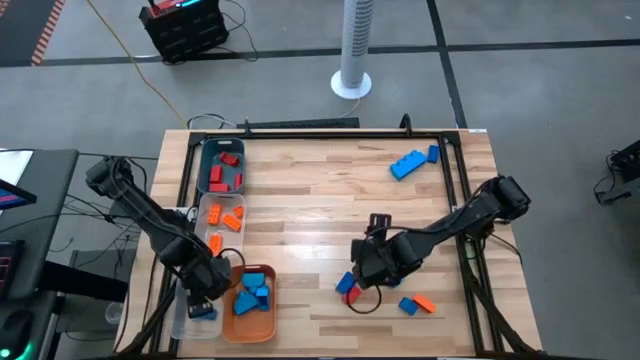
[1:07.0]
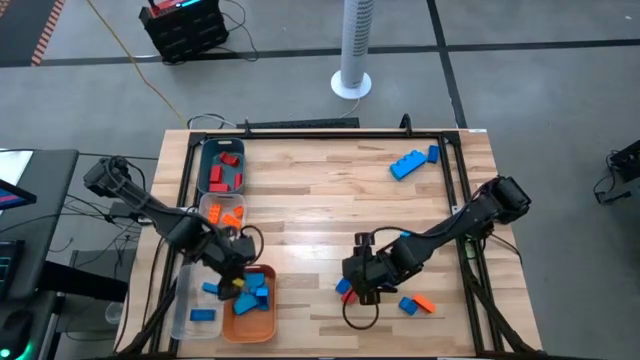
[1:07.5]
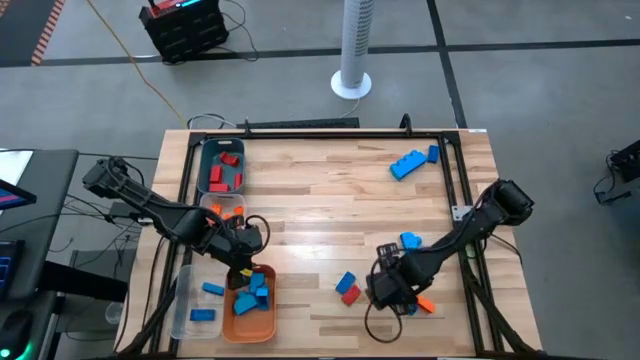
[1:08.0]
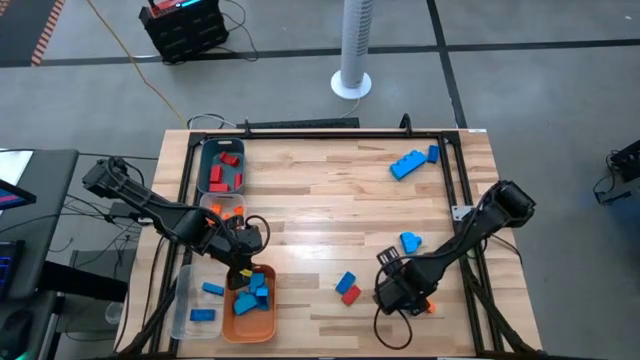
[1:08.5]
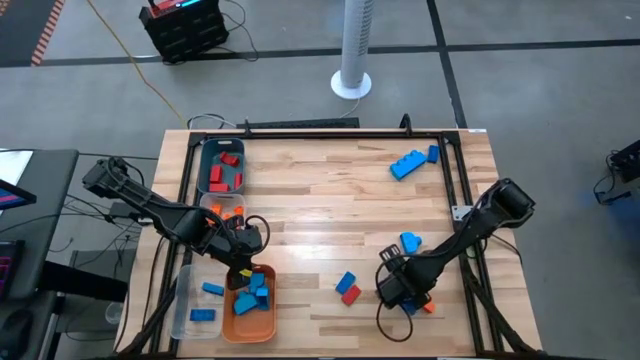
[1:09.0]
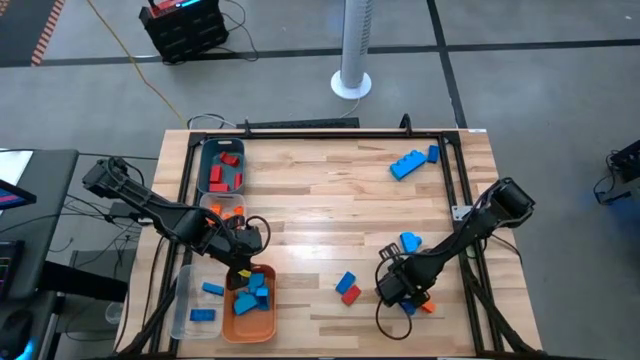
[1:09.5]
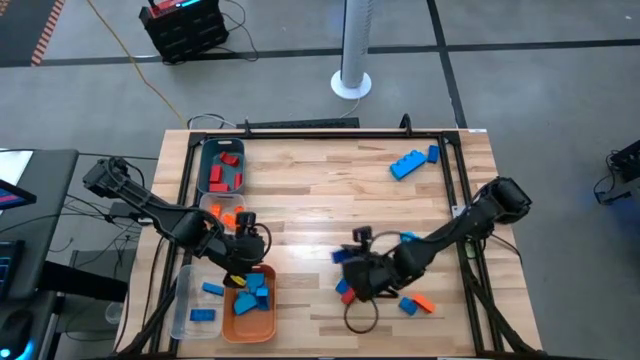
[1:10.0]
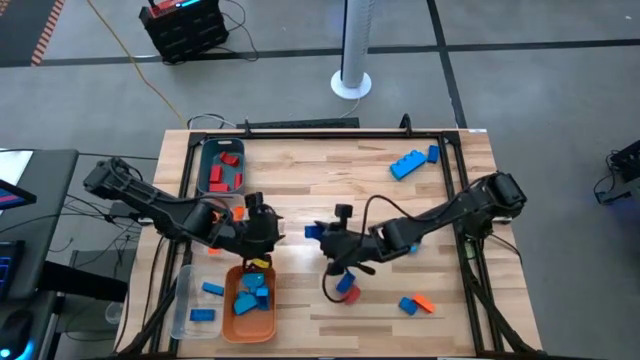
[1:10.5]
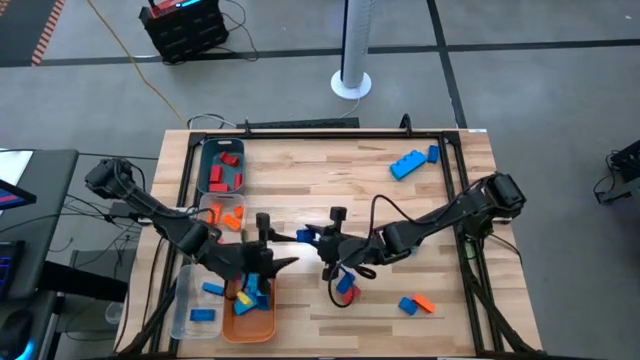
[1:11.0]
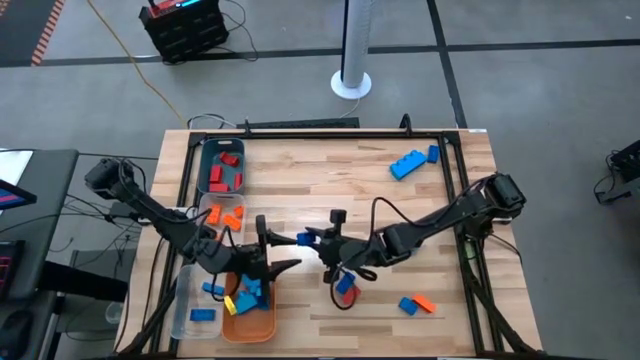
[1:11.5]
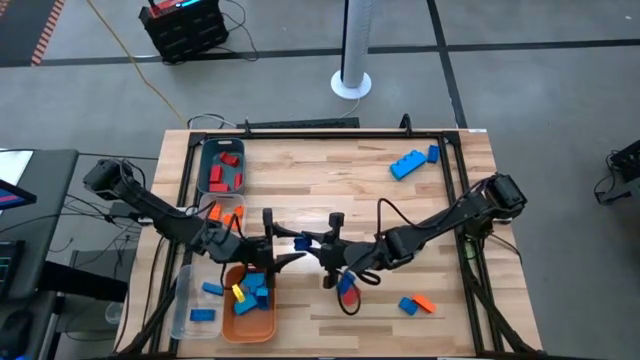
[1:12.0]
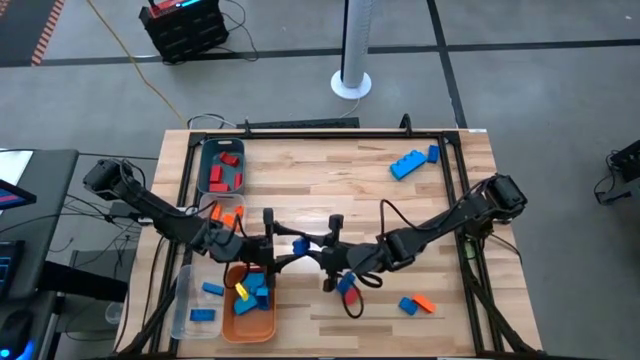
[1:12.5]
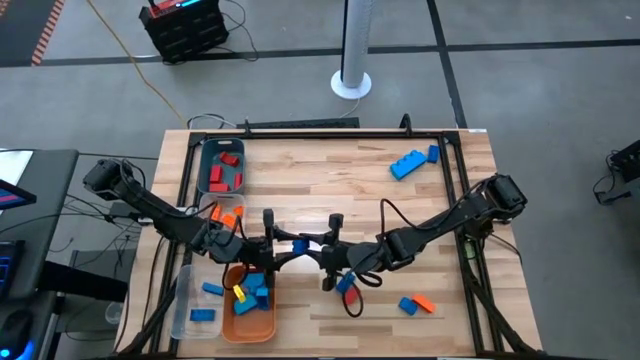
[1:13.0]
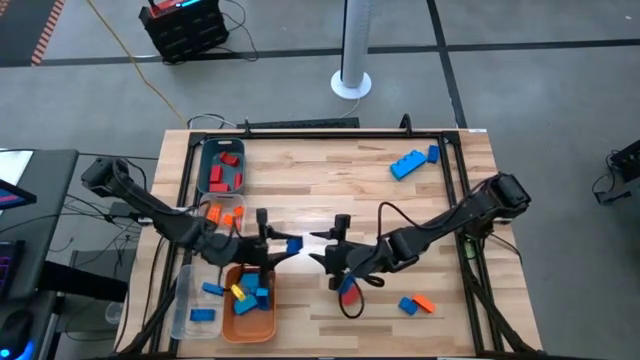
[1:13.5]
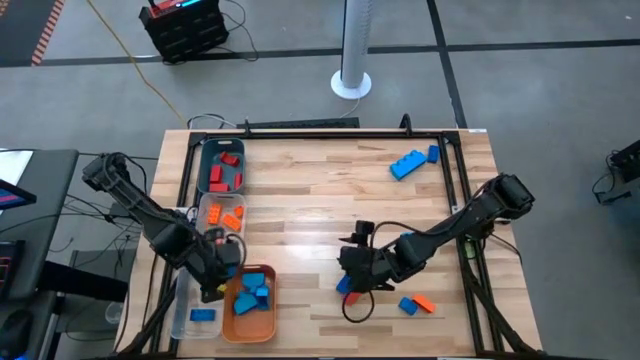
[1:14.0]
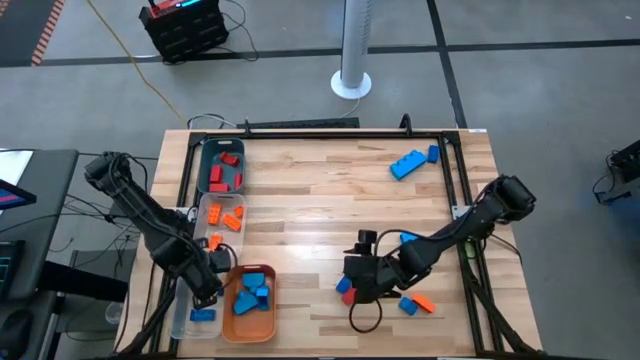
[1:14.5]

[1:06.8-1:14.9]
Task: Sort blocks
Put the blue game piece into the bottom transparent bin

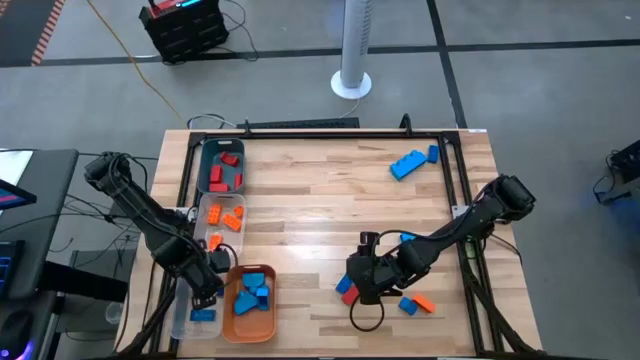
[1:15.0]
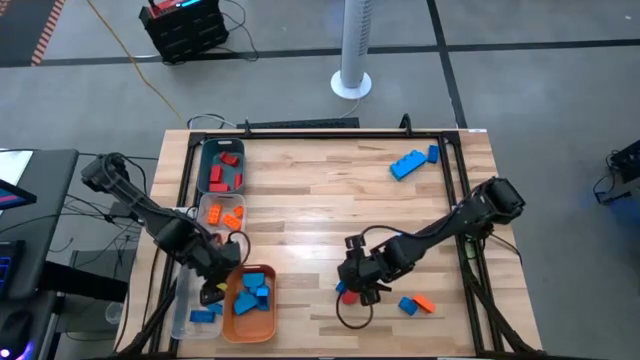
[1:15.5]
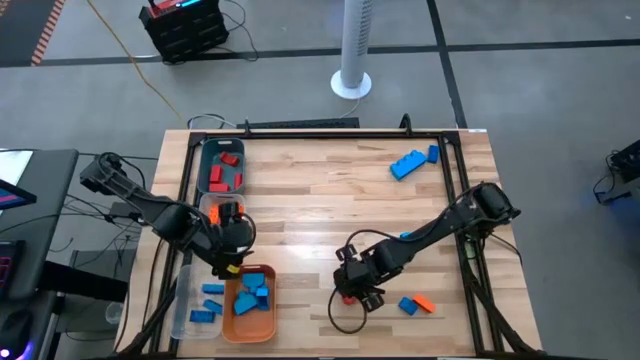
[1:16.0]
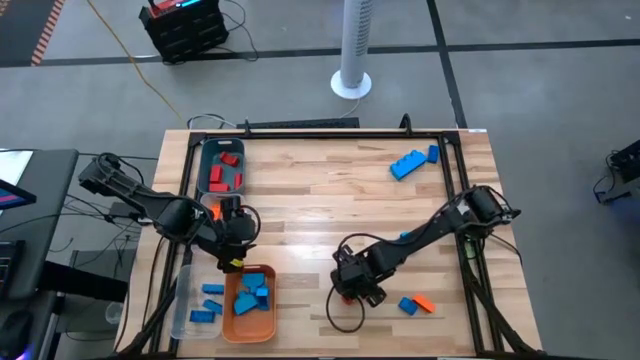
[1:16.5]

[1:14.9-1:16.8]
Put the blue game piece into the bottom transparent bin

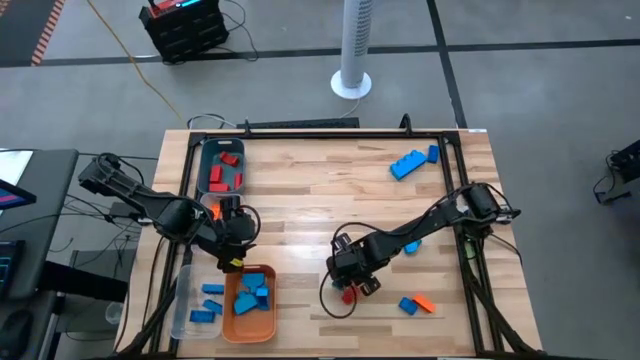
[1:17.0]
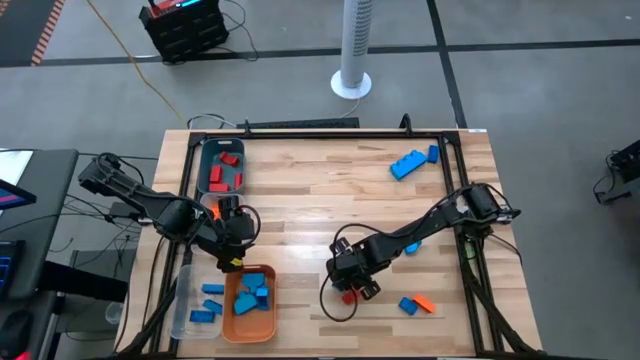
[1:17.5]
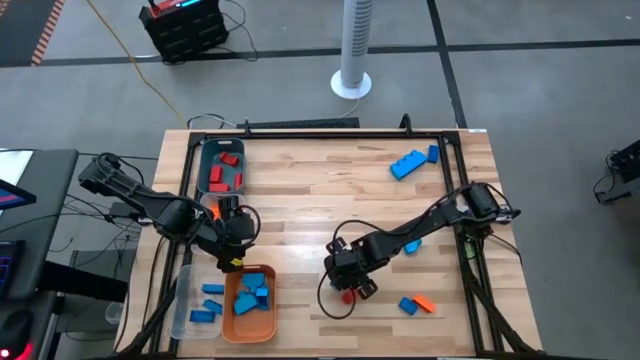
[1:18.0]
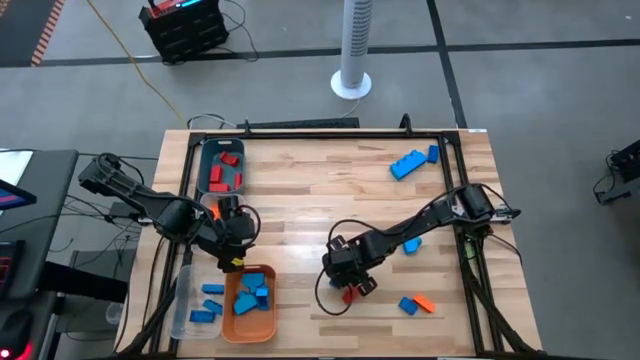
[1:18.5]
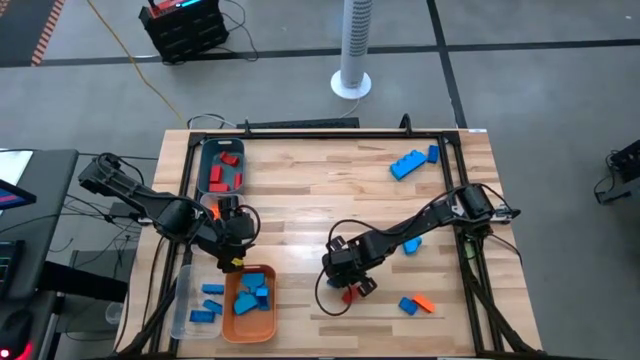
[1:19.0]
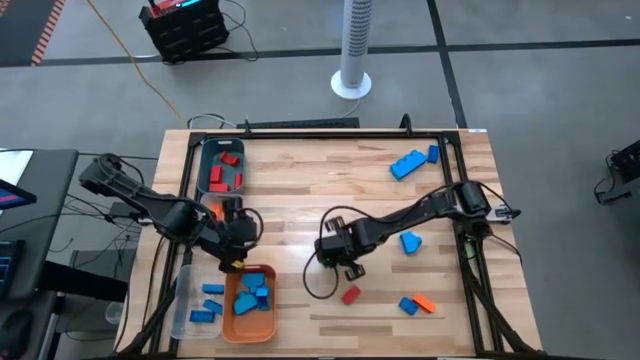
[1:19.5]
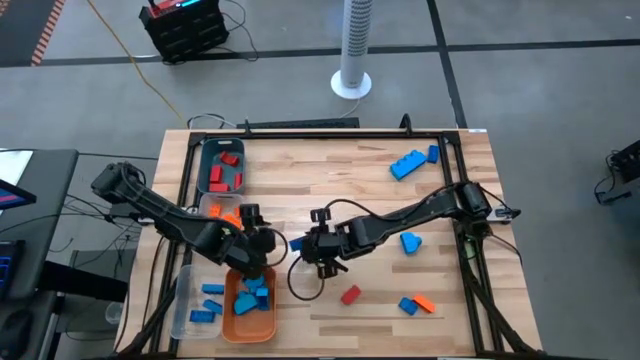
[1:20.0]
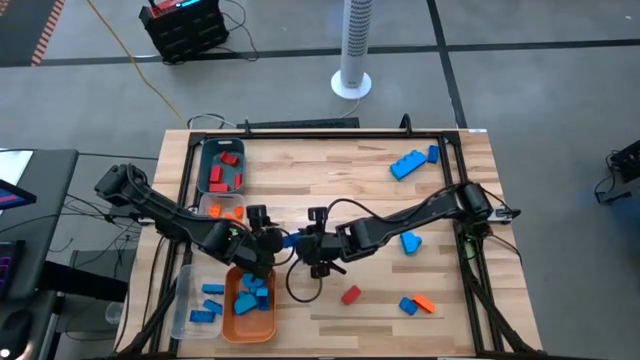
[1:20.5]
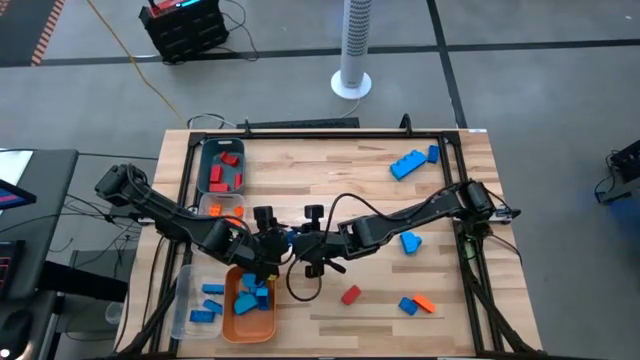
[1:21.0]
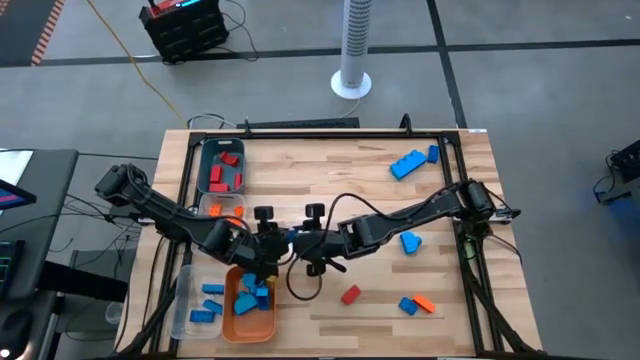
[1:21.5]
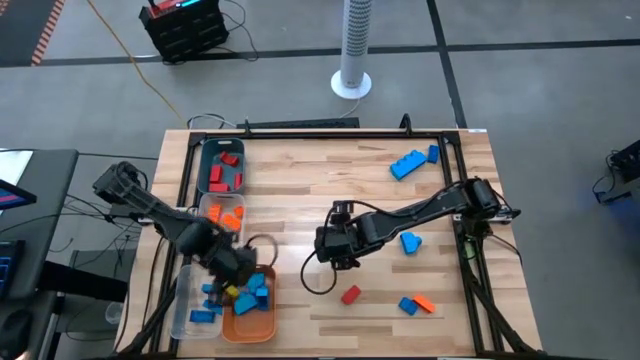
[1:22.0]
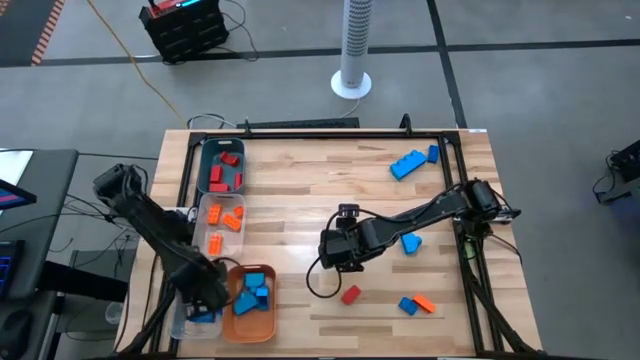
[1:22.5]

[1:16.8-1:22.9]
Put the blue game piece into the bottom transparent bin

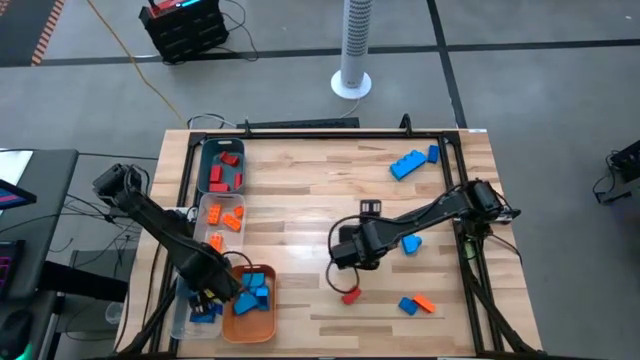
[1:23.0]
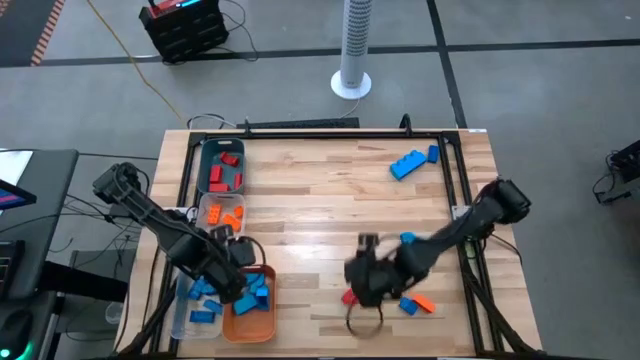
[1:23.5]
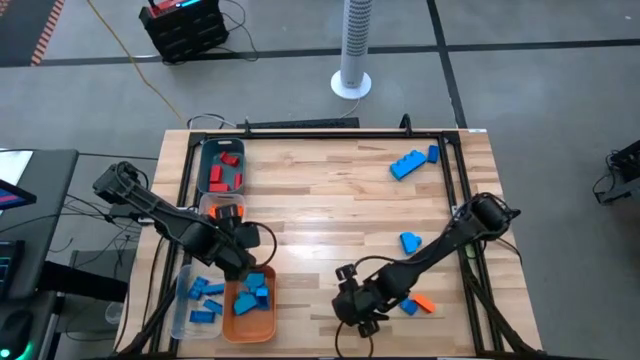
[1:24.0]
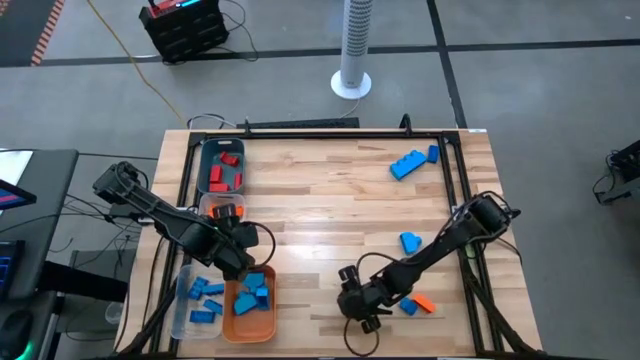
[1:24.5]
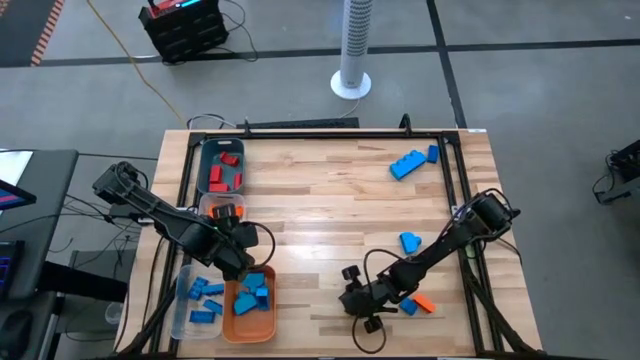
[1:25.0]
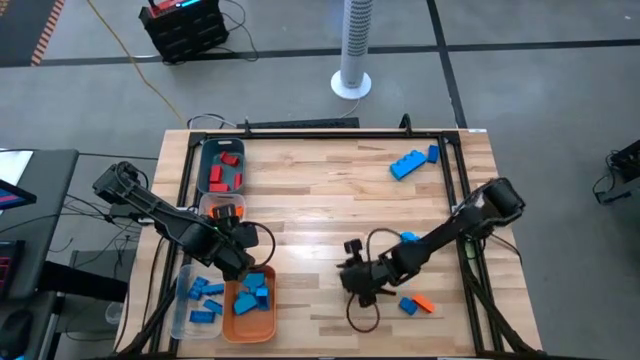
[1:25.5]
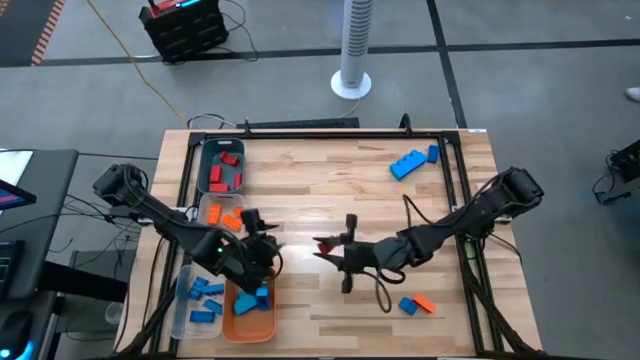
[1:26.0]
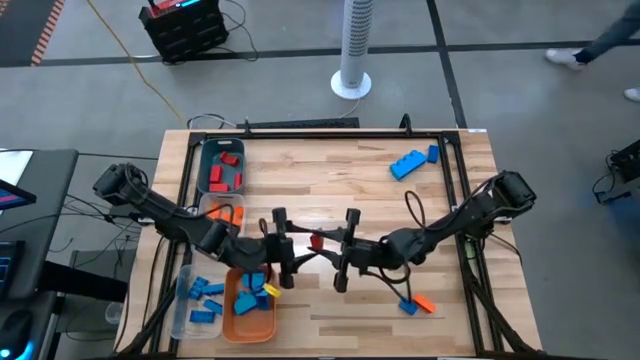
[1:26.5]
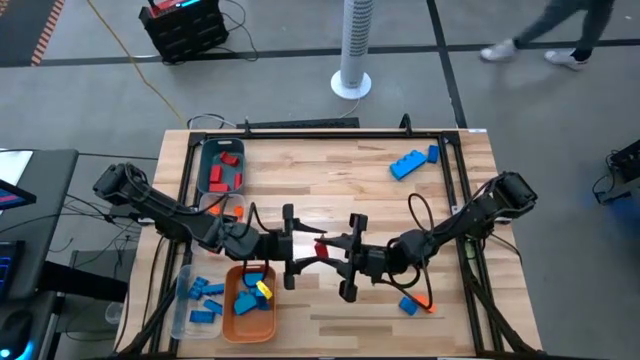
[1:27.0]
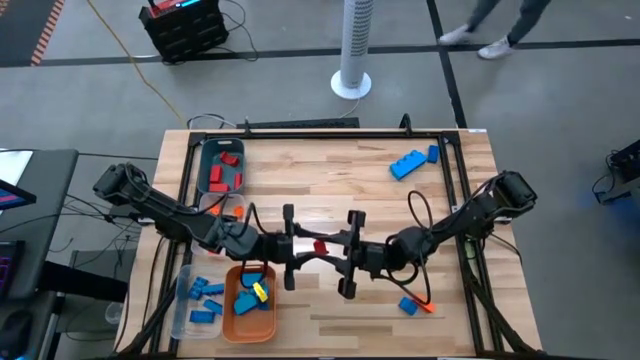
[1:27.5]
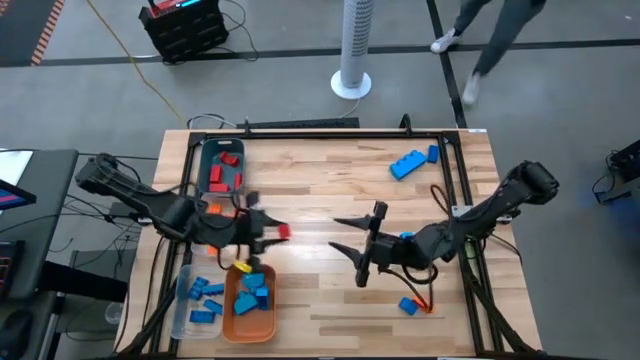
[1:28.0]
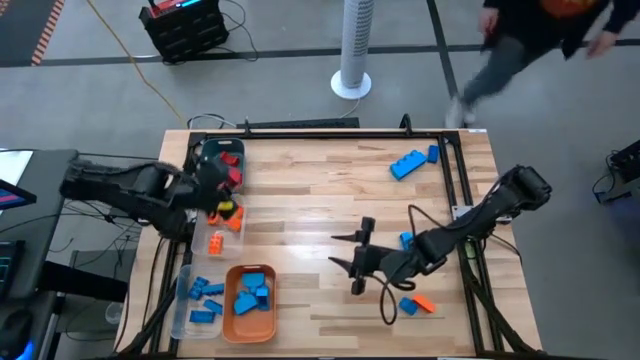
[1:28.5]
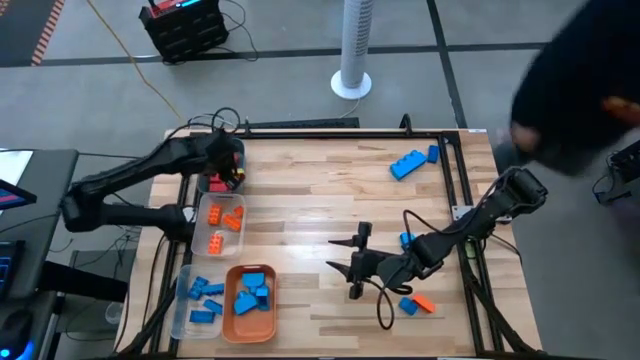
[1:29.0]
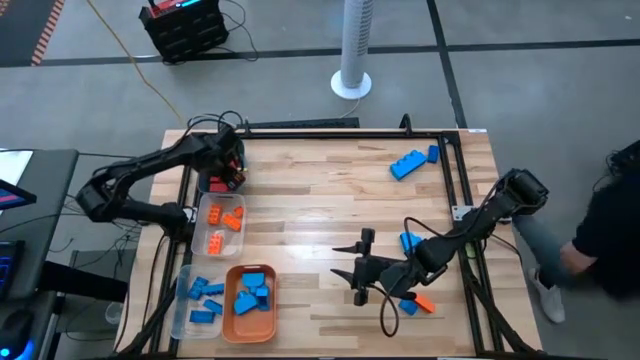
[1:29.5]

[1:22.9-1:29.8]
Put the red block into the blue bin
